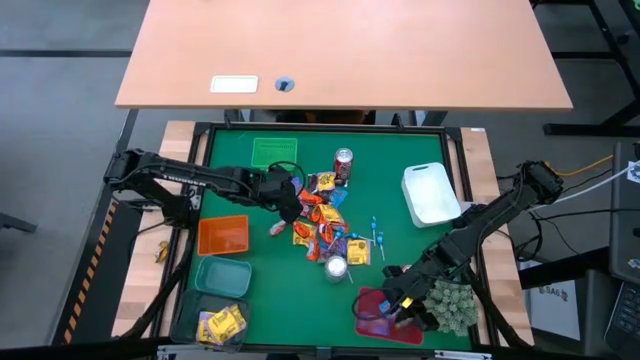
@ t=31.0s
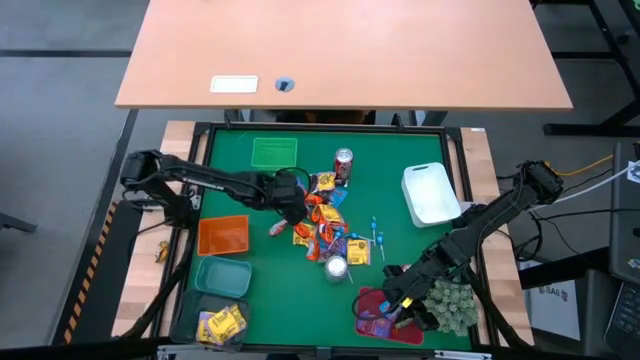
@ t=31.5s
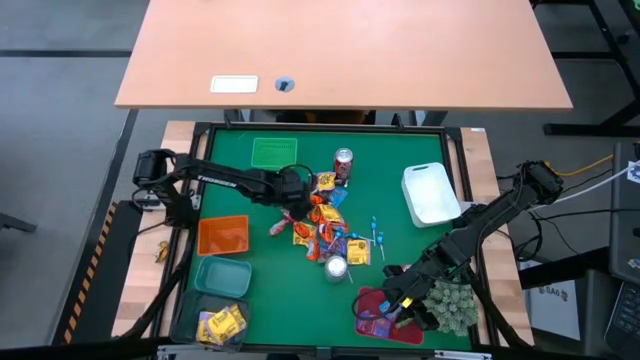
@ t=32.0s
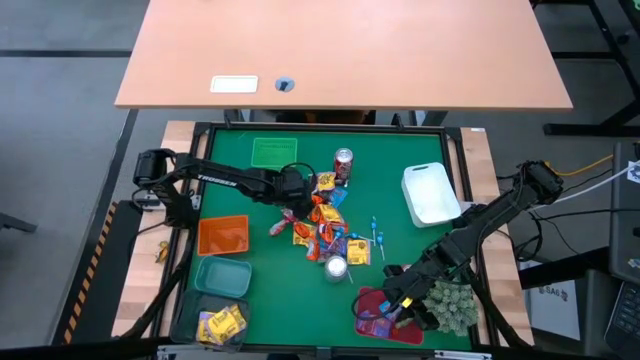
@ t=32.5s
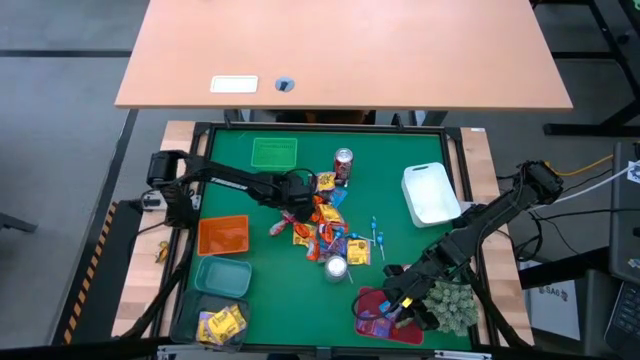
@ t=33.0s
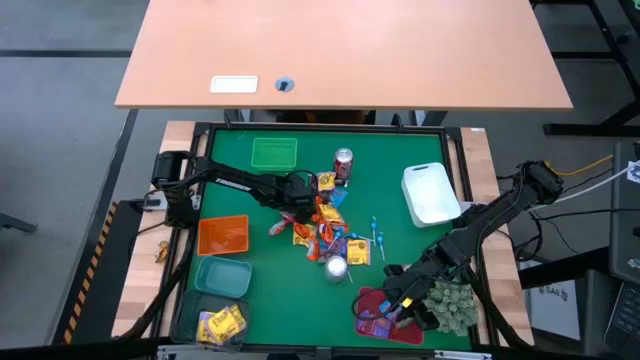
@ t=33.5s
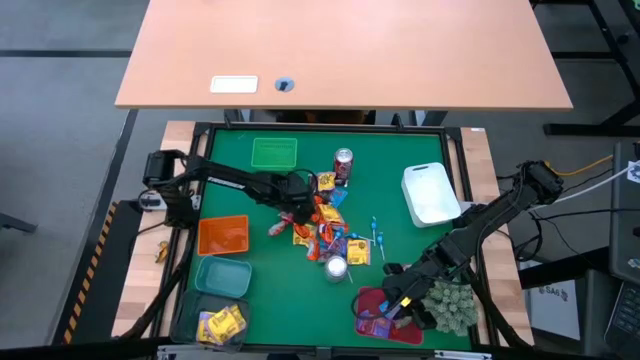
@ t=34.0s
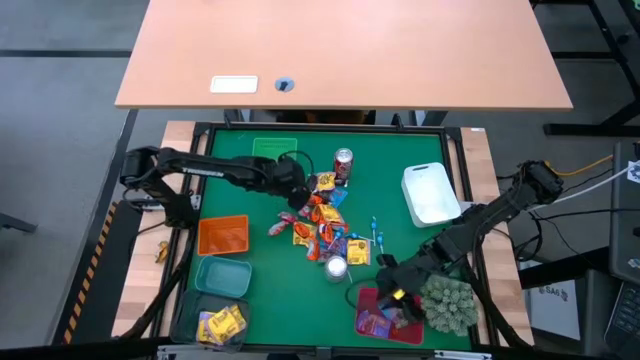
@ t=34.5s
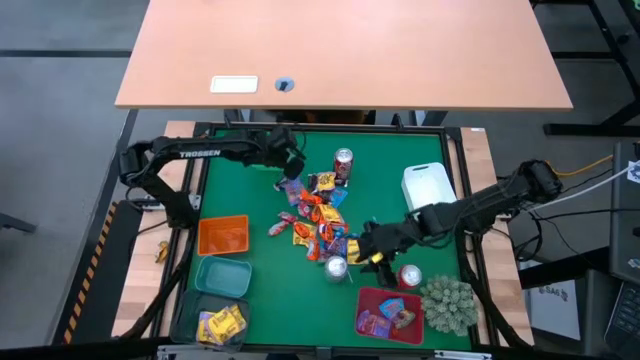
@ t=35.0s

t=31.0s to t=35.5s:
Task: Sort candy
Put the orange chocolate into the green bin

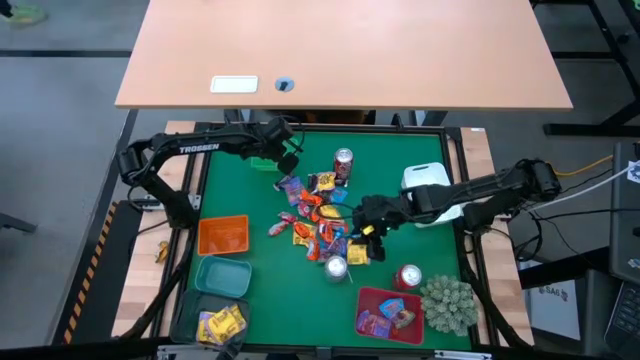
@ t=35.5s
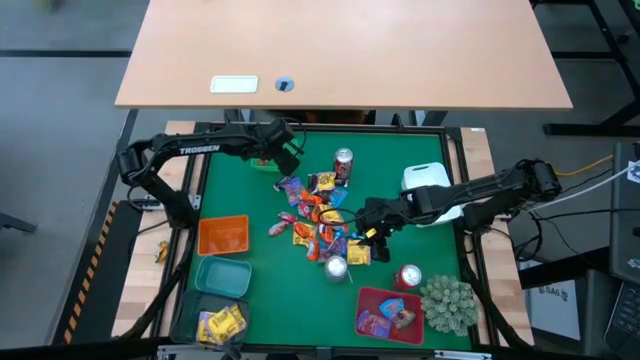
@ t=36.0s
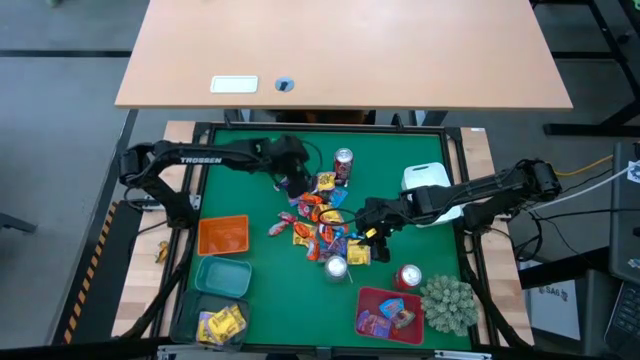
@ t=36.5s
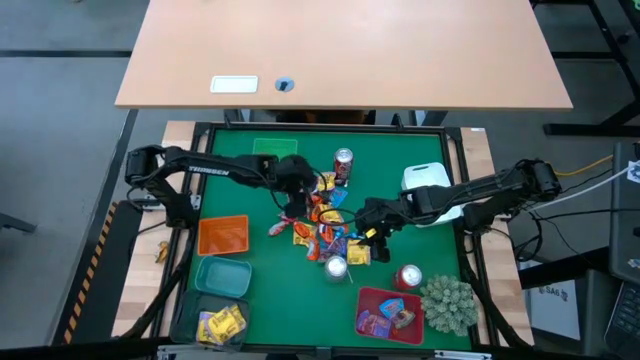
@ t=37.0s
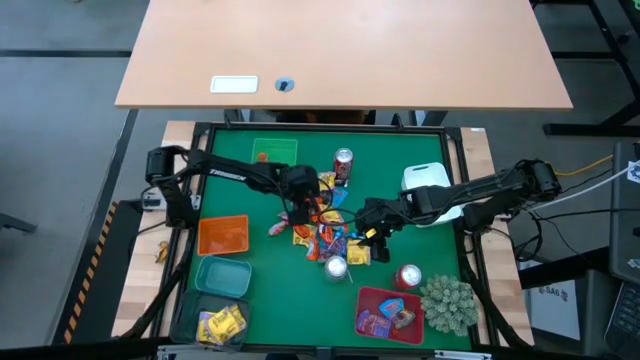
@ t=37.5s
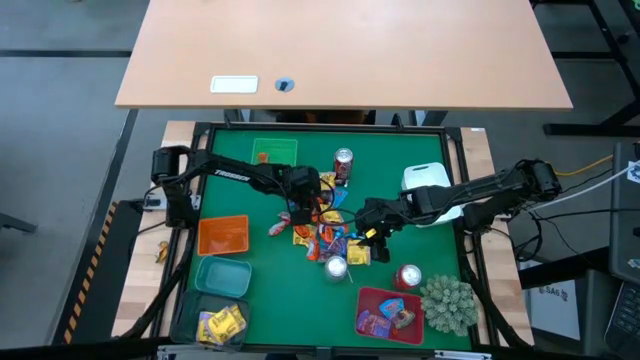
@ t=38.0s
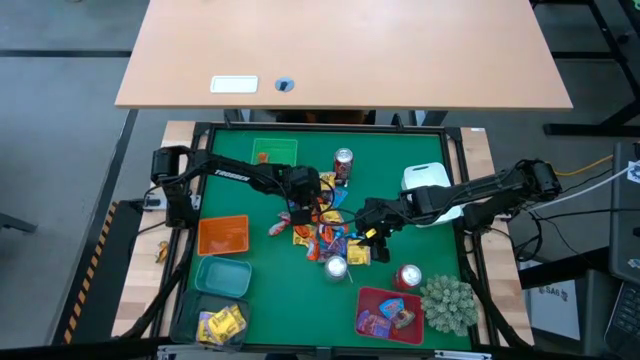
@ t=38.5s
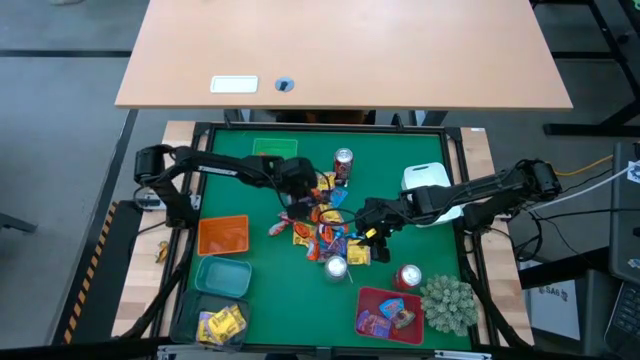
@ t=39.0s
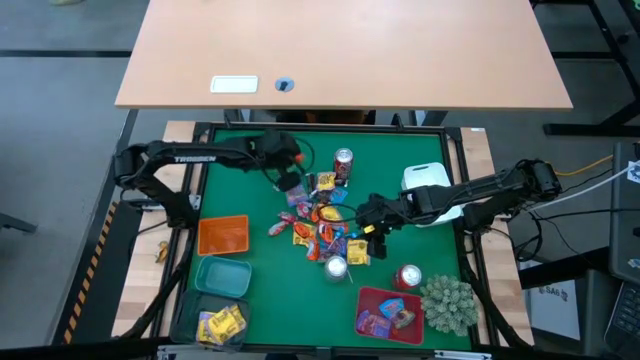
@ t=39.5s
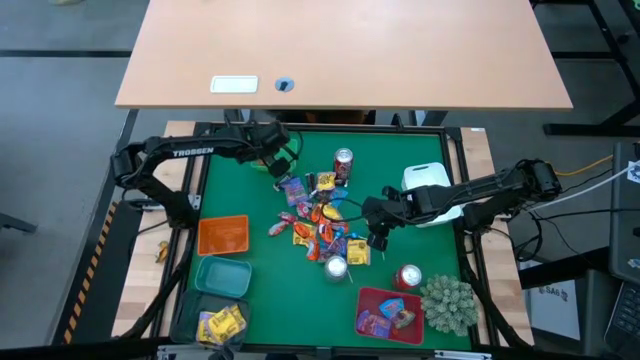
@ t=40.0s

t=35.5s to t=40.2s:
Put the orange chocolate into the green bin

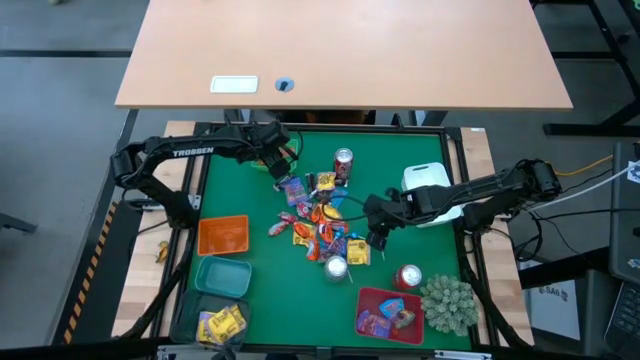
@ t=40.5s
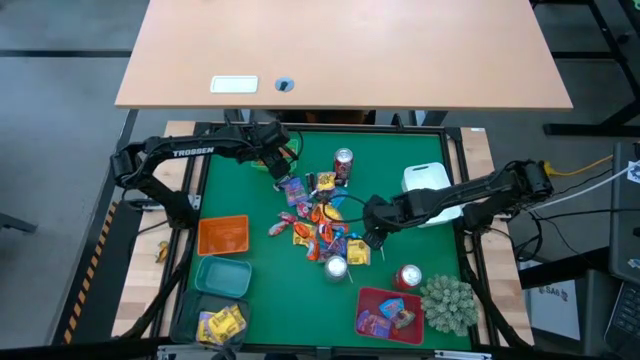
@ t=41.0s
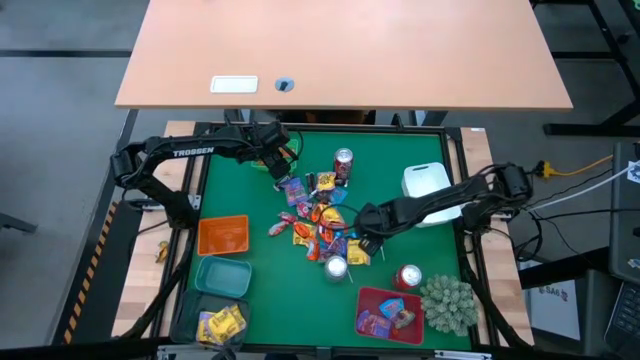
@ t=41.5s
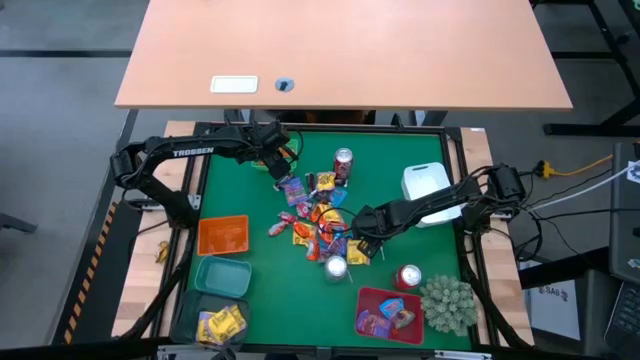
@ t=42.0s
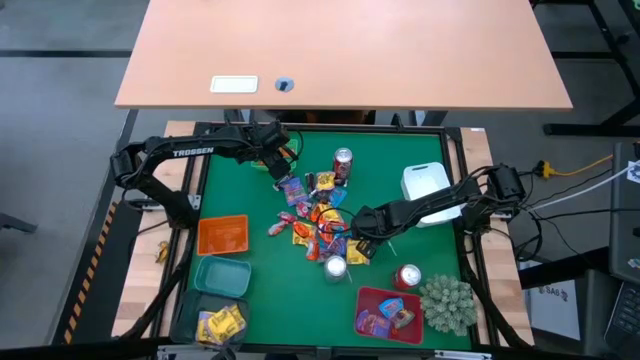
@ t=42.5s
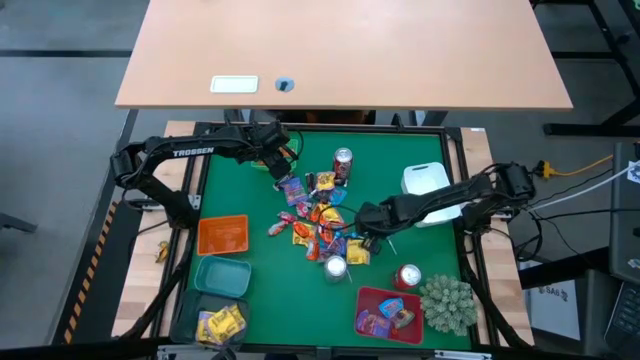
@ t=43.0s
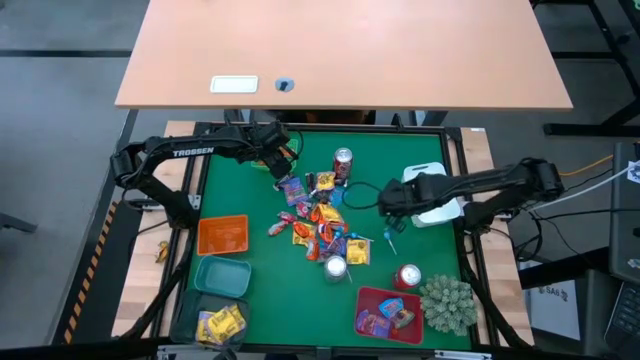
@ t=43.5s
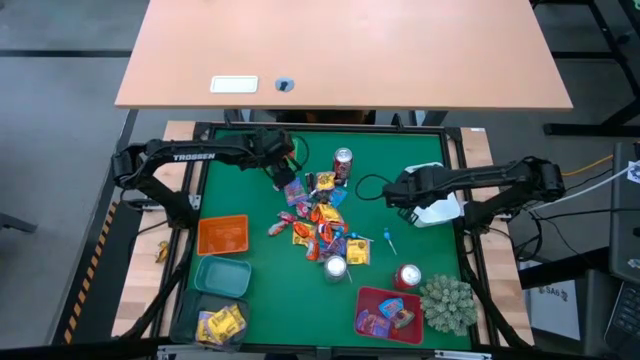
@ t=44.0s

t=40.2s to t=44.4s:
Put the blue lollipop candy into the white bin

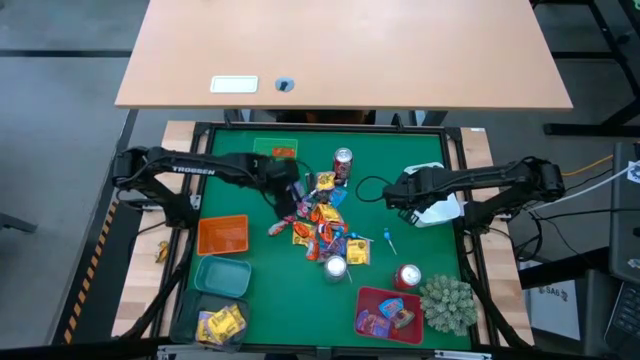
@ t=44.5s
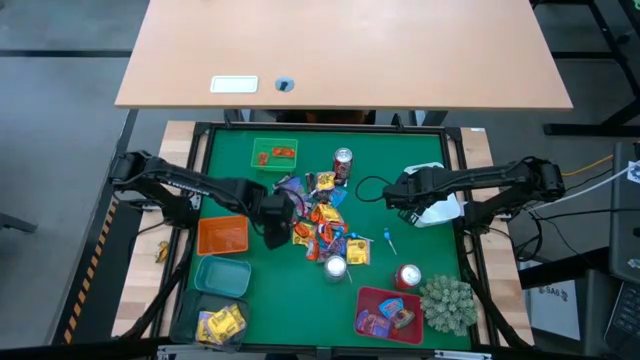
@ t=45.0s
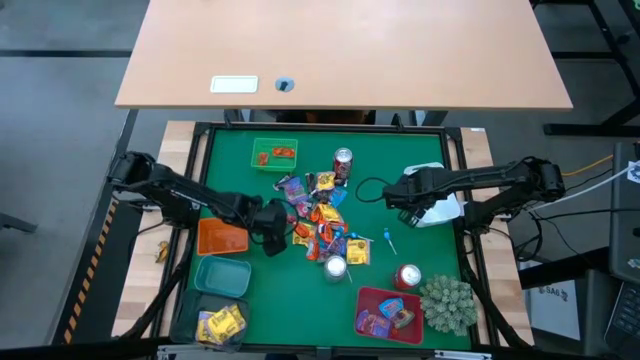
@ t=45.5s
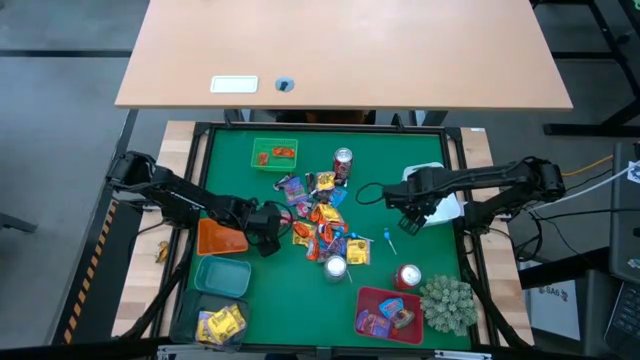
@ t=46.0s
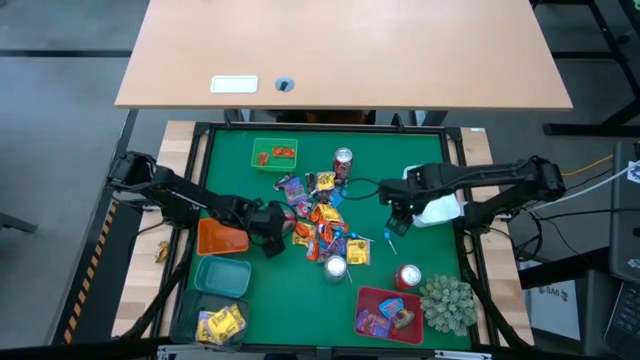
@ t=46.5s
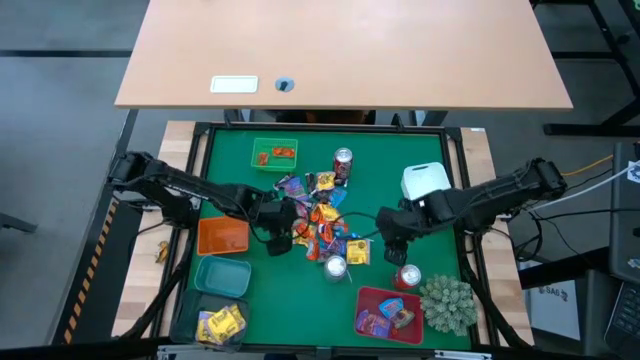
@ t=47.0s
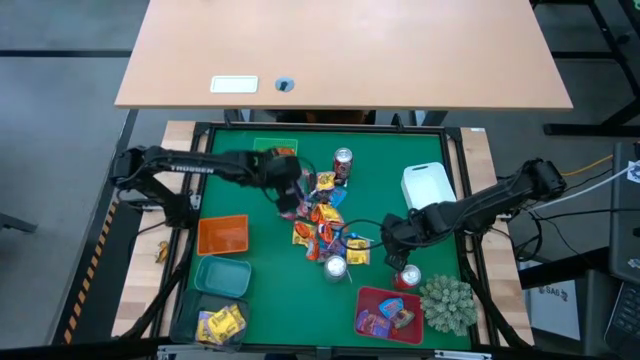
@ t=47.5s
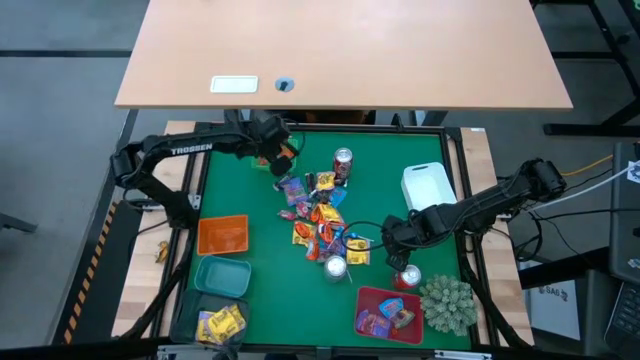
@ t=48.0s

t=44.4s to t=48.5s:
Put the orange chocolate into the green bin

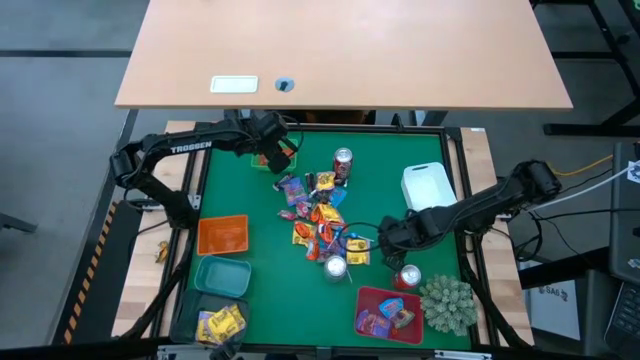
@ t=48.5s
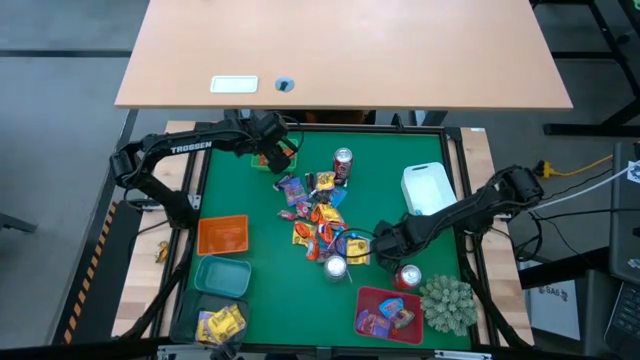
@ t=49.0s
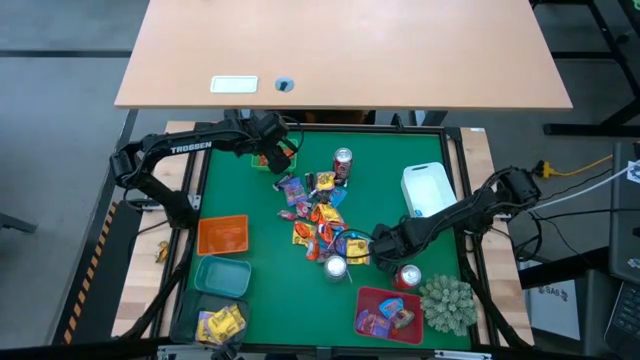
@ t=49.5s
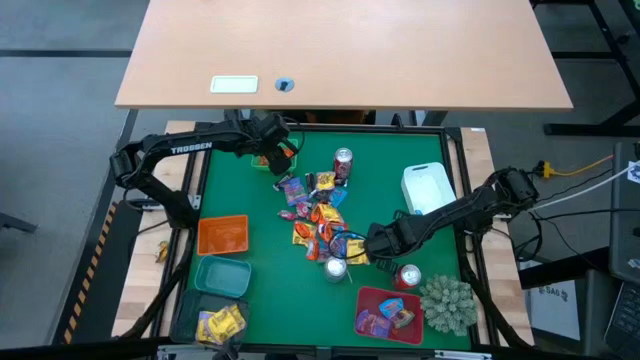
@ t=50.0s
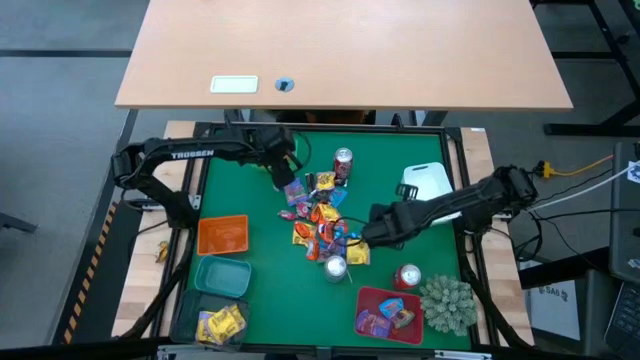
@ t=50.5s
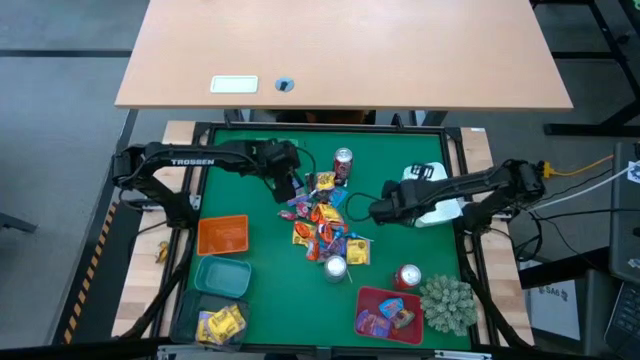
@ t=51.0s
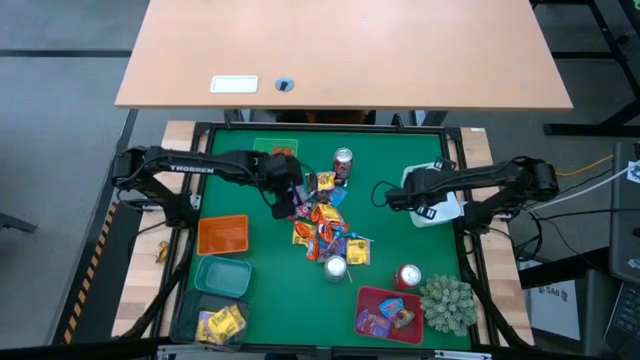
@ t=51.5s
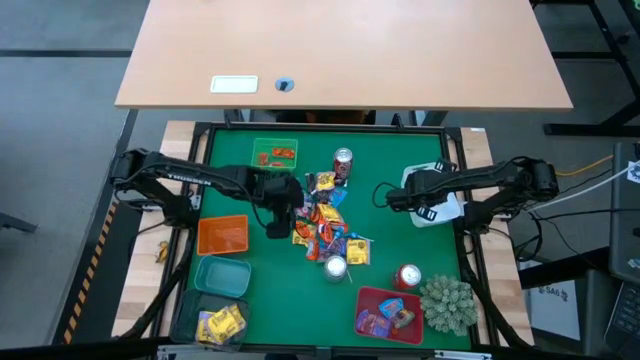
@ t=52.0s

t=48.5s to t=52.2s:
Put the blue lollipop candy into the white bin
